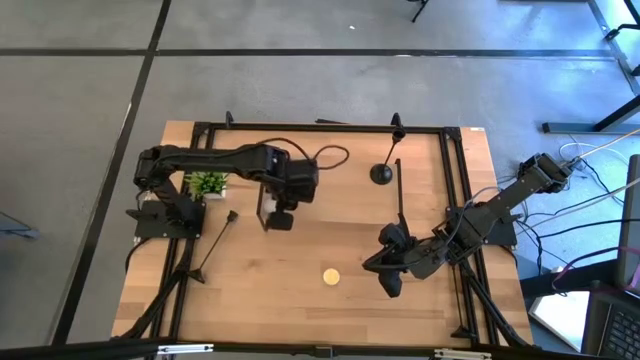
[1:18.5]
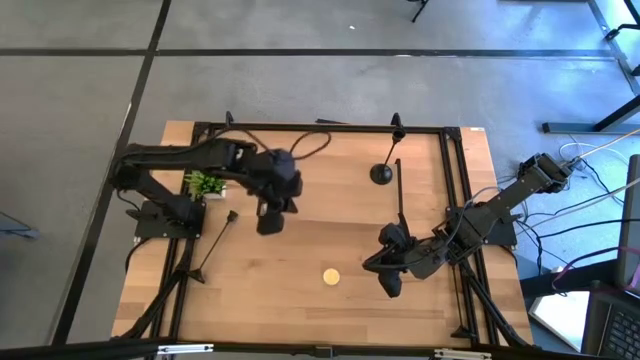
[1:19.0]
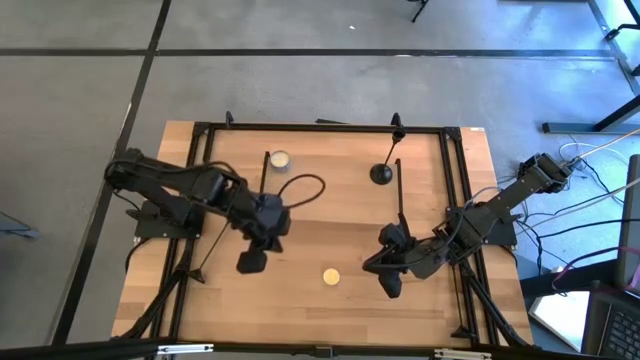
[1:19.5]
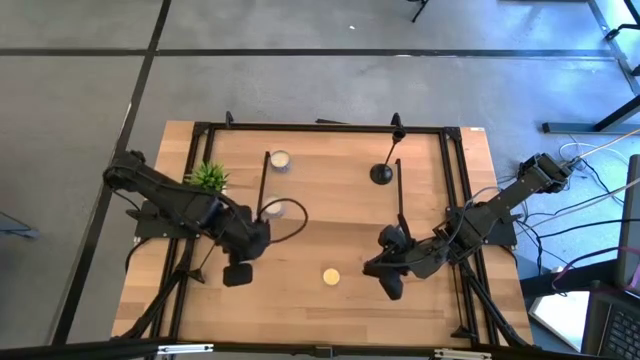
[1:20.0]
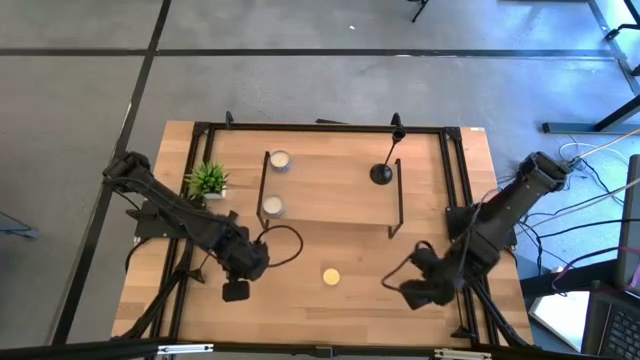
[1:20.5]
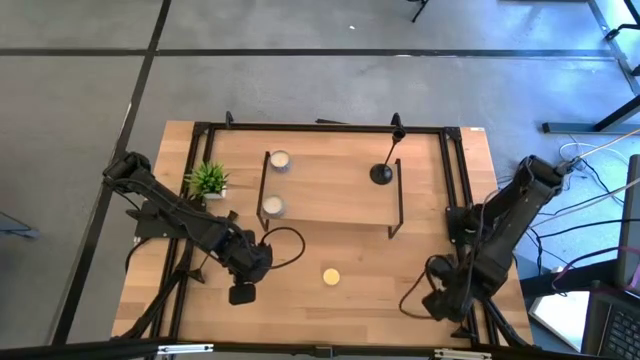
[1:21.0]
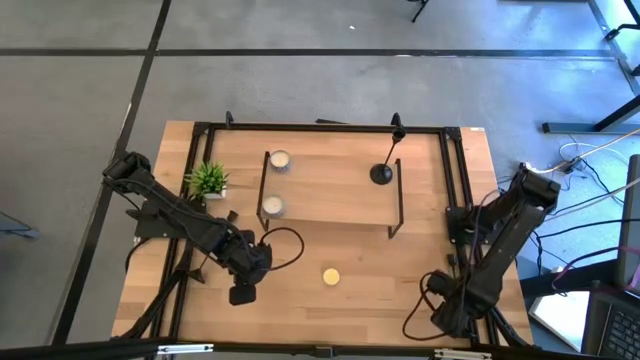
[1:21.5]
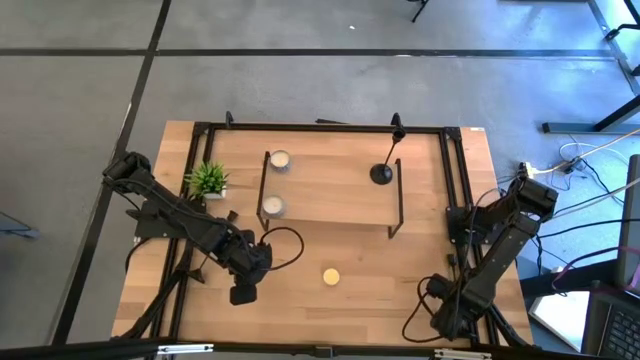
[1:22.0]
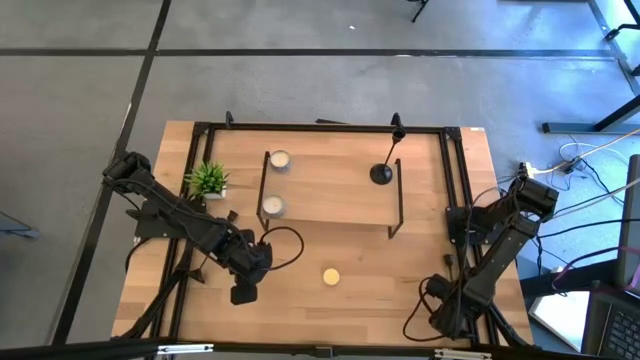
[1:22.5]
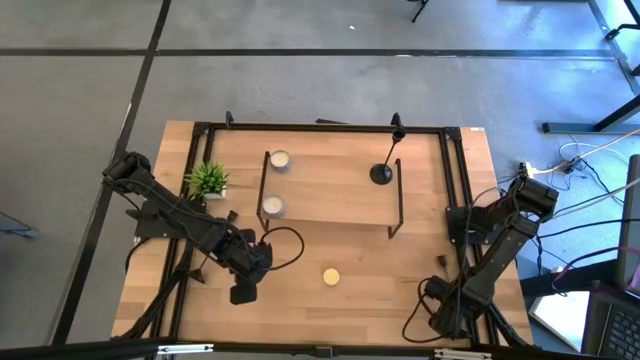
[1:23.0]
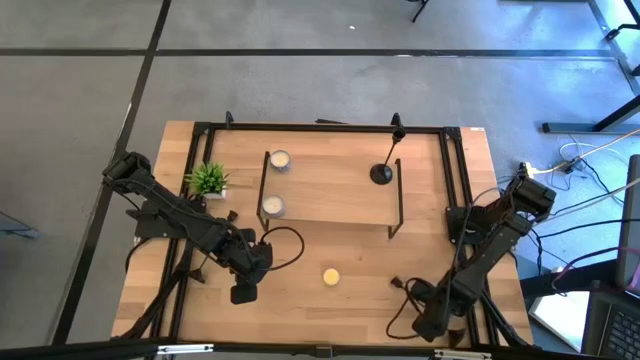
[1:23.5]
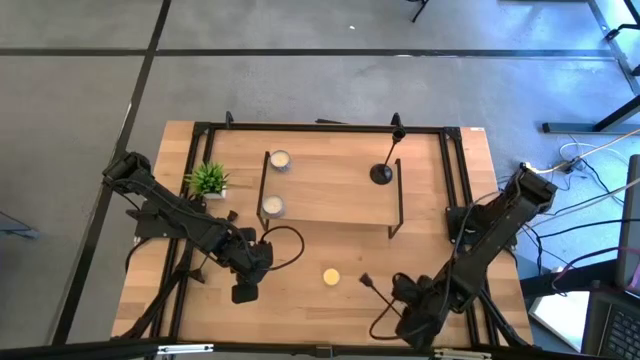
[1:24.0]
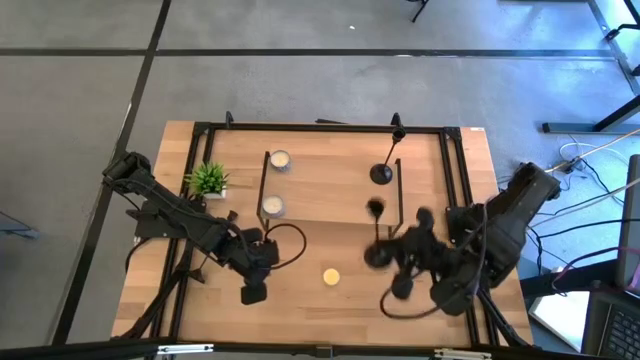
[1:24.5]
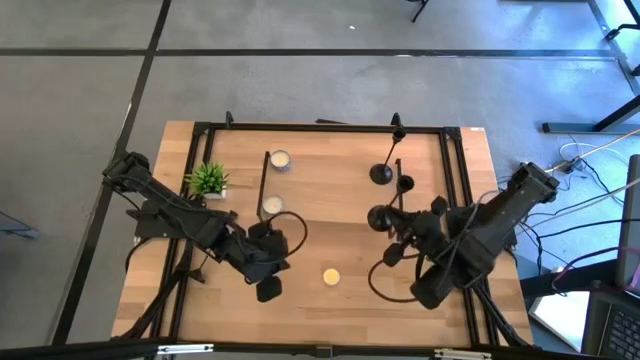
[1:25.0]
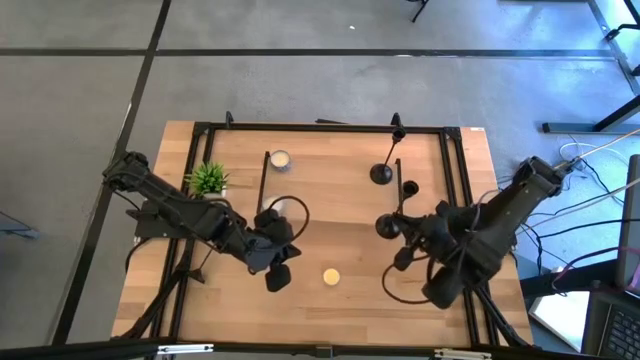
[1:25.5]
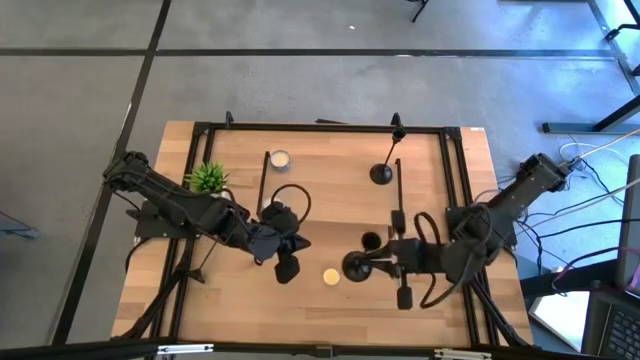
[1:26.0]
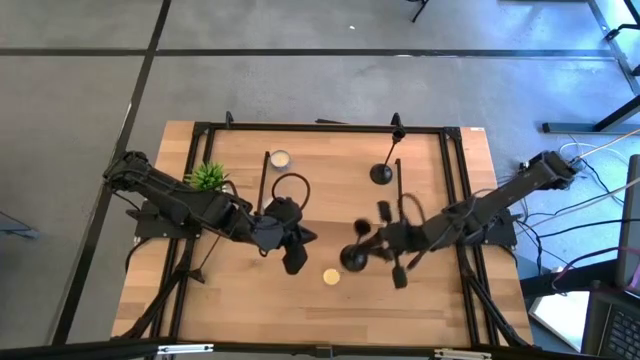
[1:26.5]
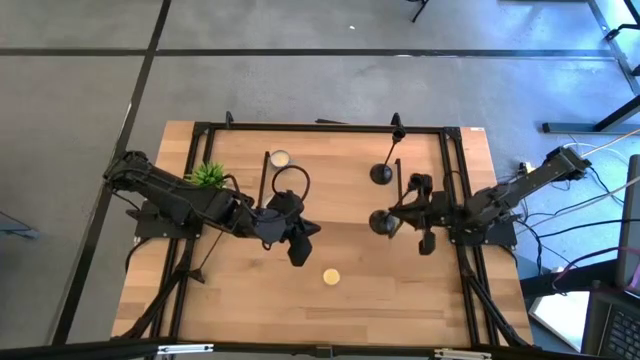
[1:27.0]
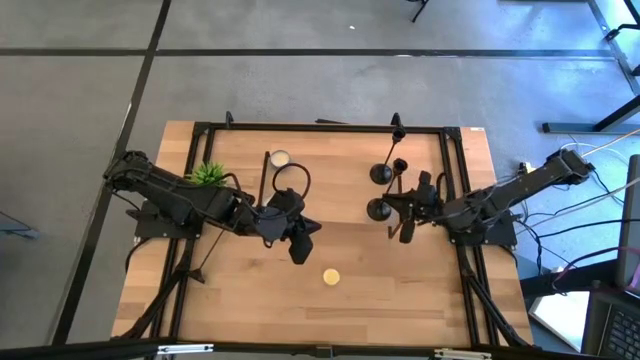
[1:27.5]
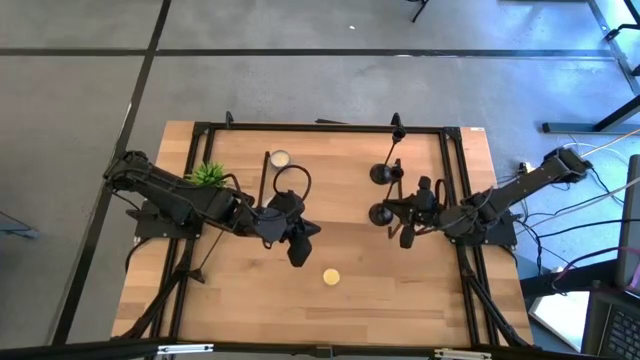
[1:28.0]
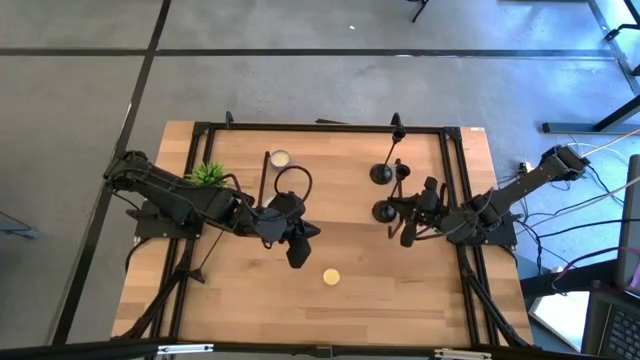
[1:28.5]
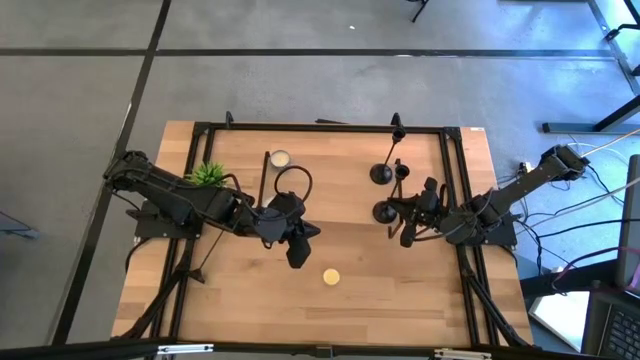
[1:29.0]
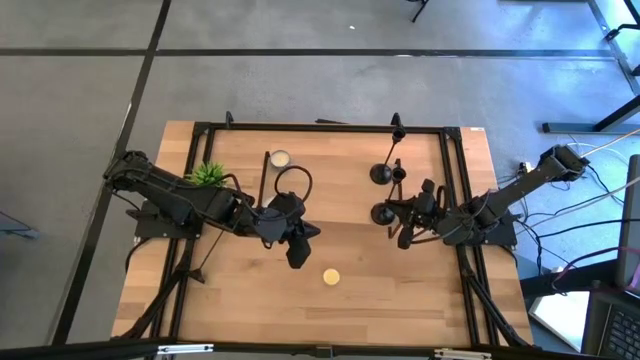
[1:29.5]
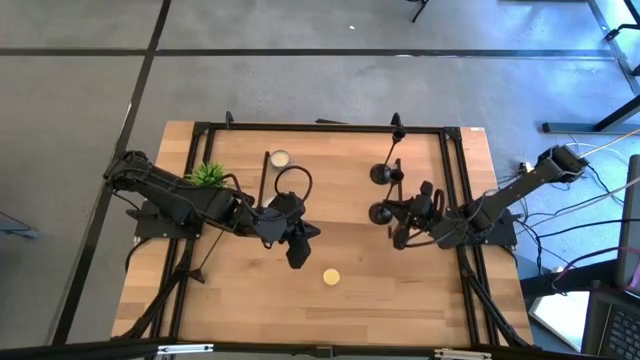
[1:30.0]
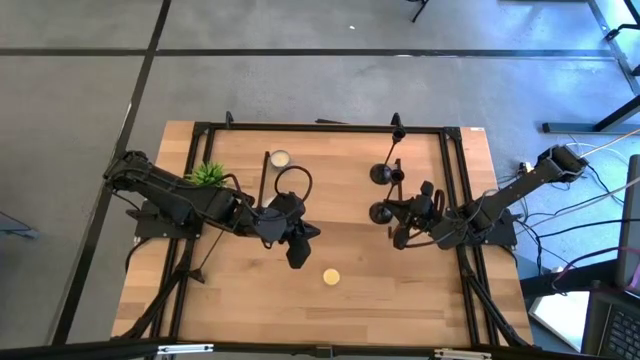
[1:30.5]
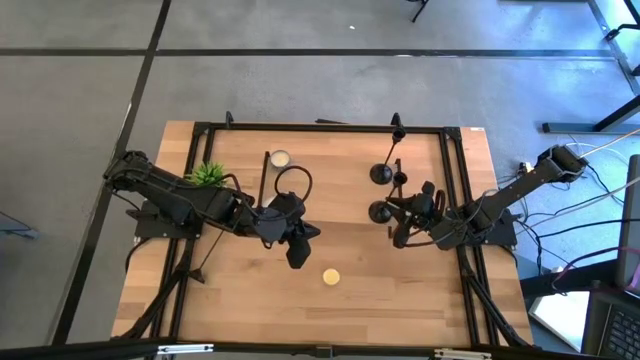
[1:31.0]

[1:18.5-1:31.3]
Task: Pick & Place candle stick holders
Put the right black candle holder on the shelf

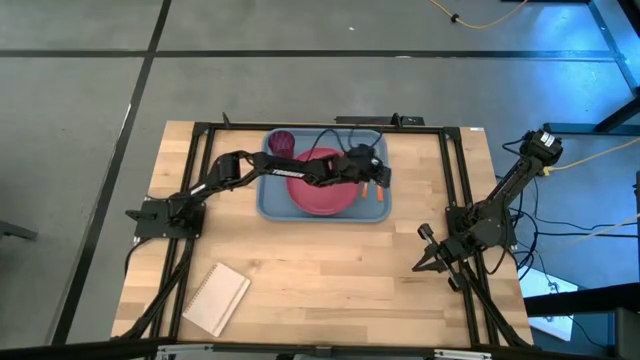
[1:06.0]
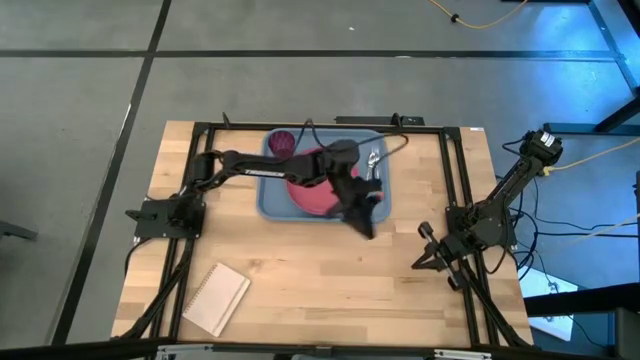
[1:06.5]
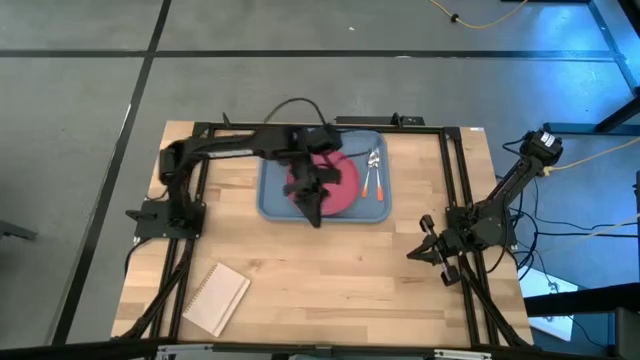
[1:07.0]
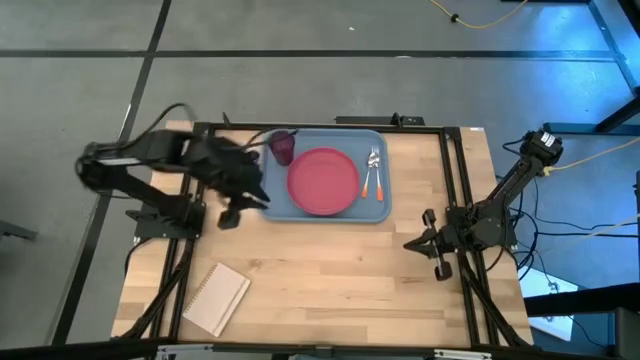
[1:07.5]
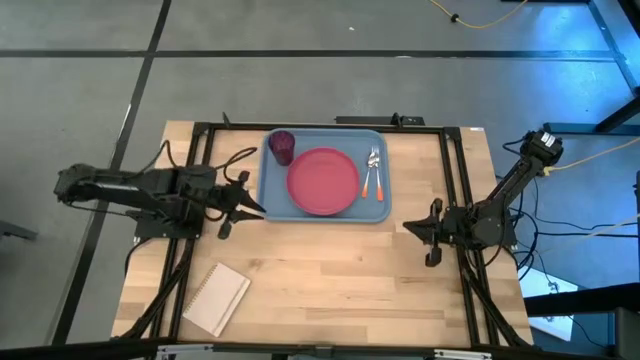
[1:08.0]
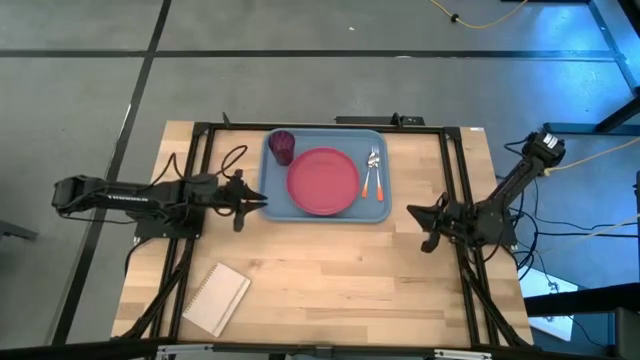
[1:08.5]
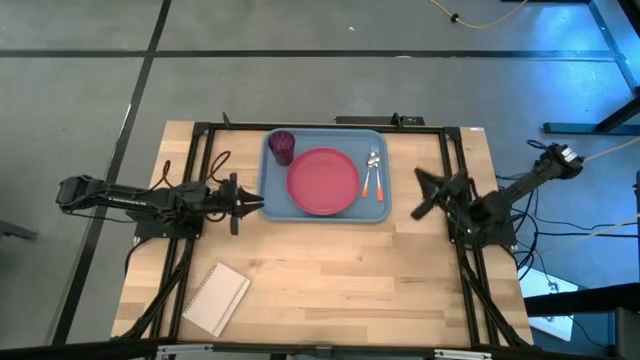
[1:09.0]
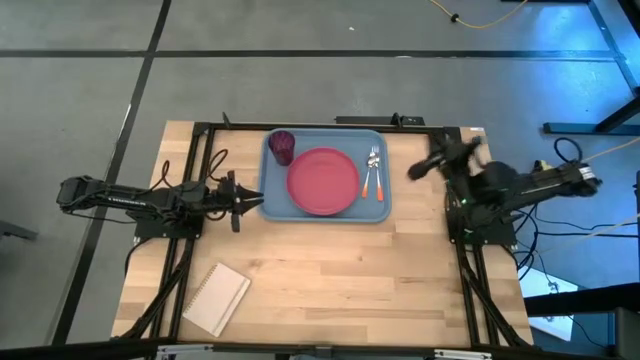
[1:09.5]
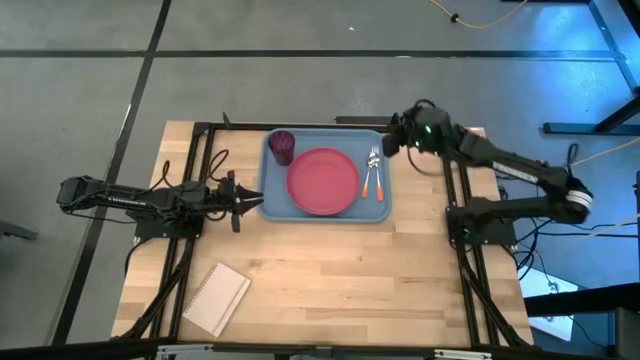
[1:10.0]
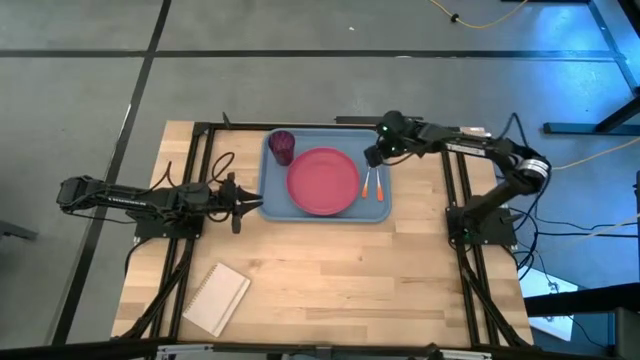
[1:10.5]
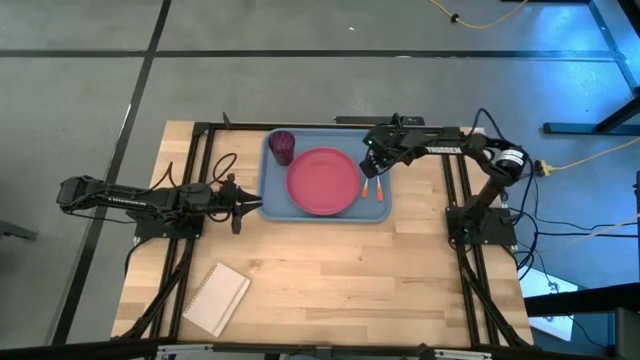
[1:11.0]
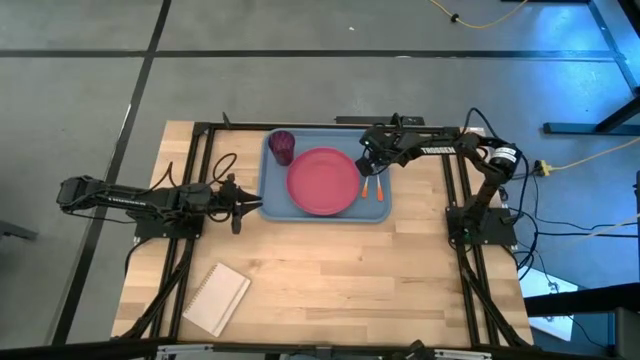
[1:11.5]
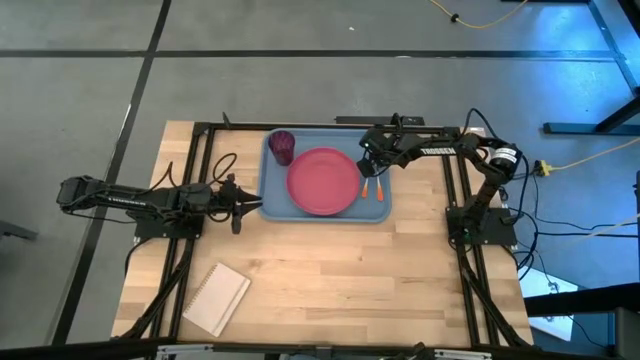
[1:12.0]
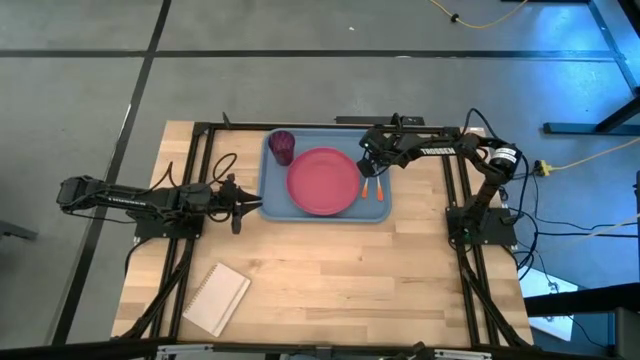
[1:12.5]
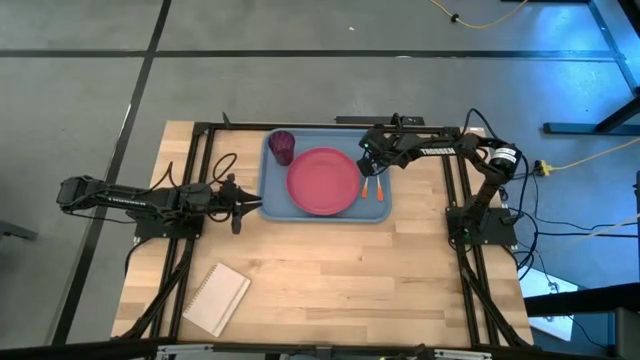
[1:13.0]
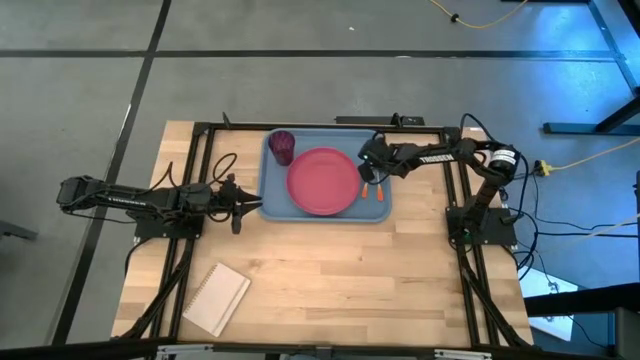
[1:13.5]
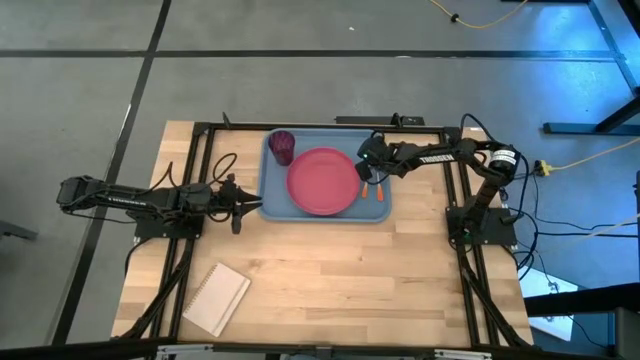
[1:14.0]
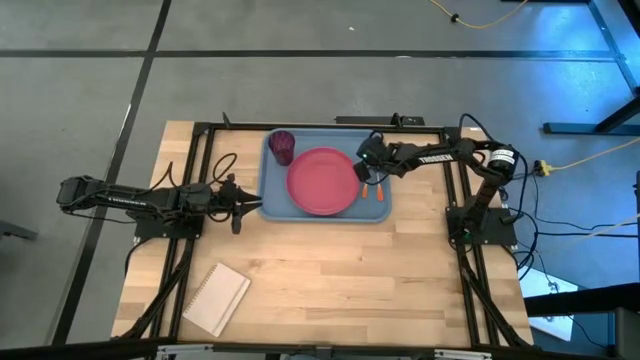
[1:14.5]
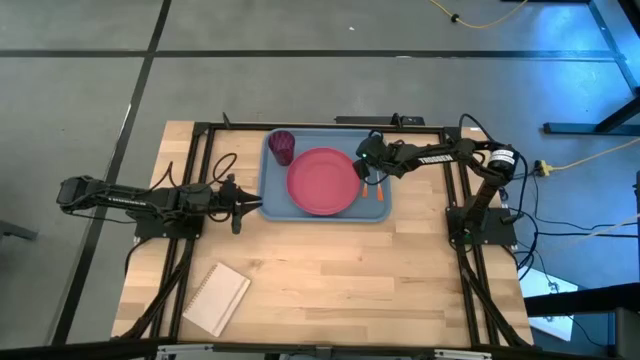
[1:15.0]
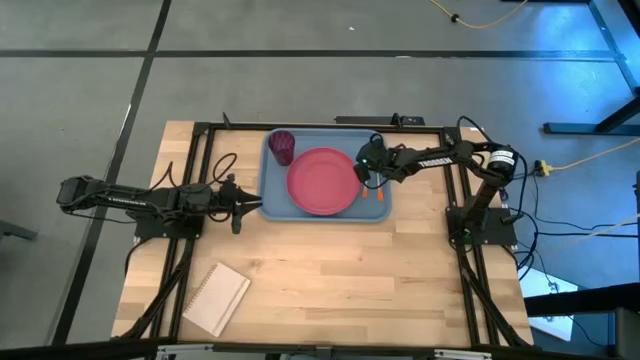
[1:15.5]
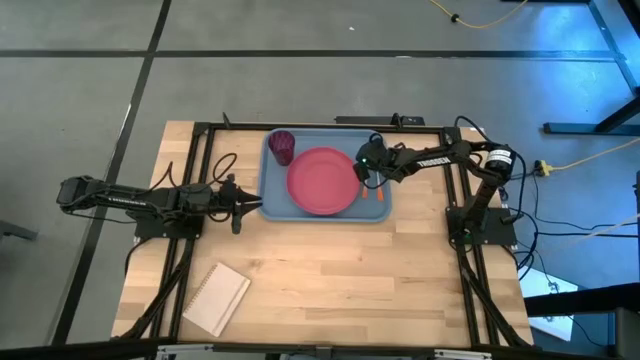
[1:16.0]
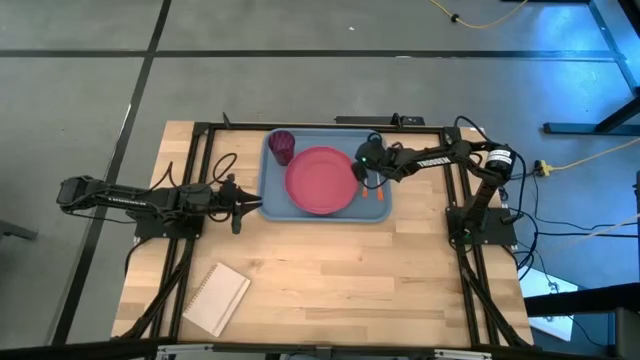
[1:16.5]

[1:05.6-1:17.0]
Task: Pick and place plate/cup/fork/spoon on tray
Adjust the orange spoon on the blue serving tray
